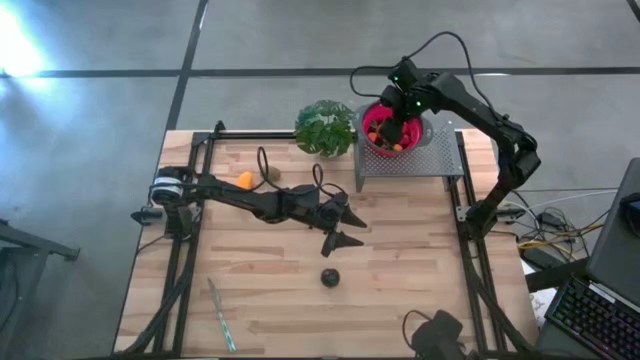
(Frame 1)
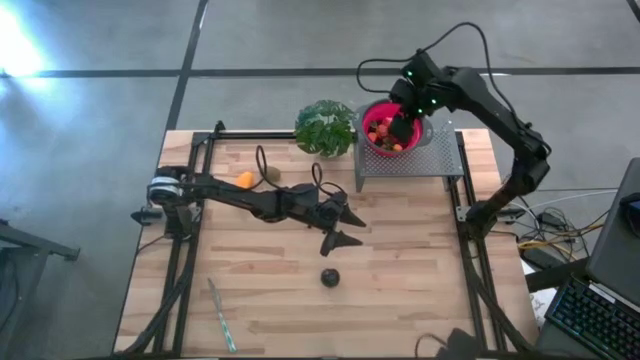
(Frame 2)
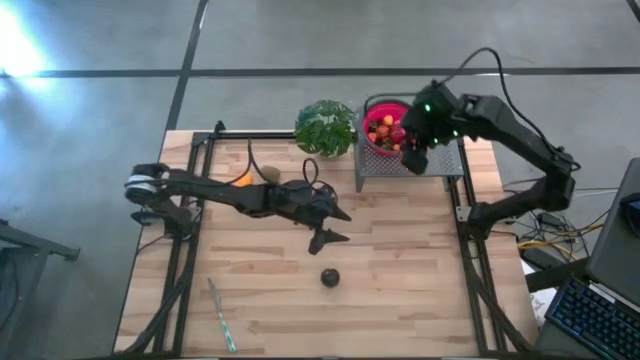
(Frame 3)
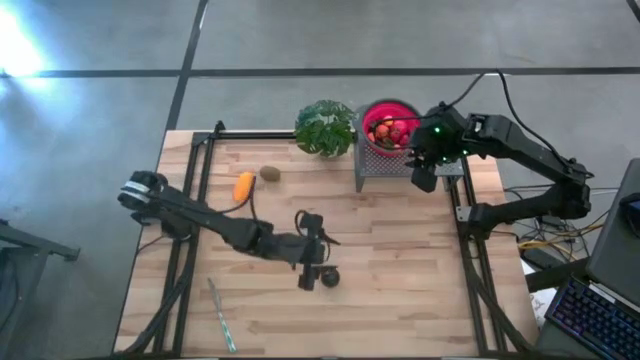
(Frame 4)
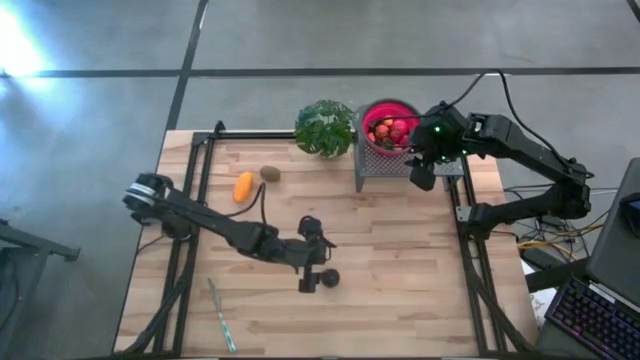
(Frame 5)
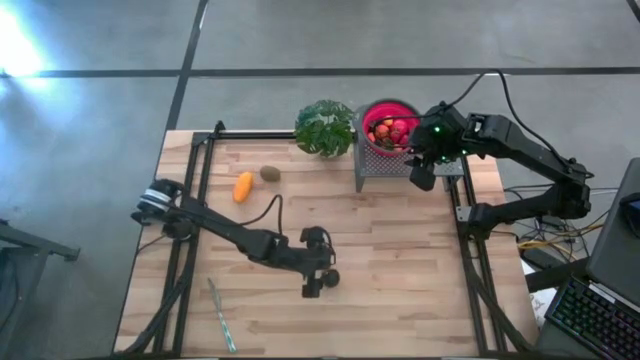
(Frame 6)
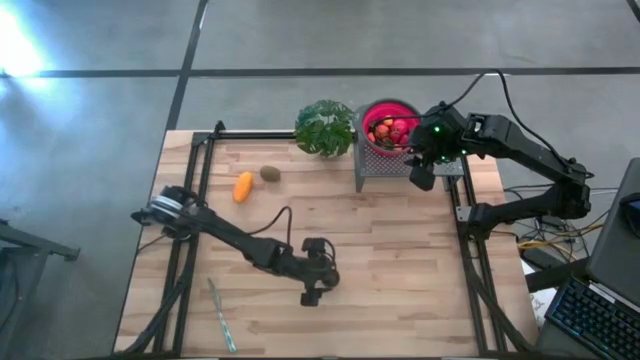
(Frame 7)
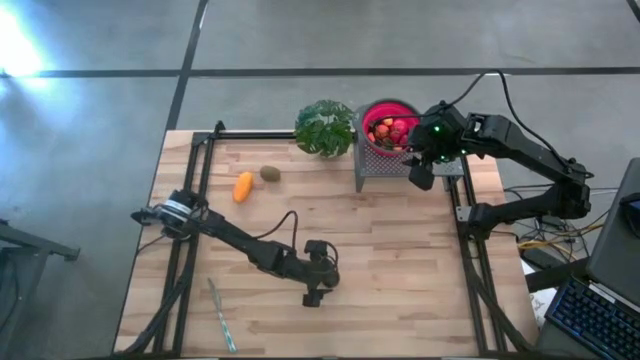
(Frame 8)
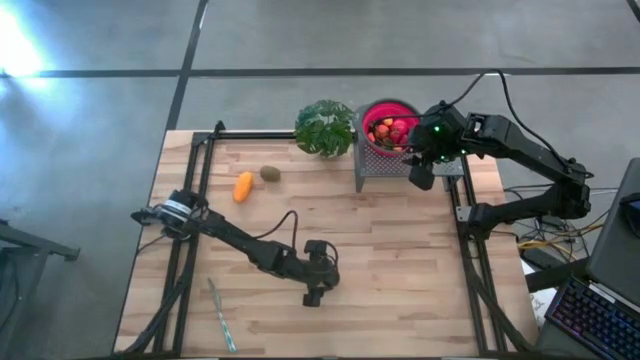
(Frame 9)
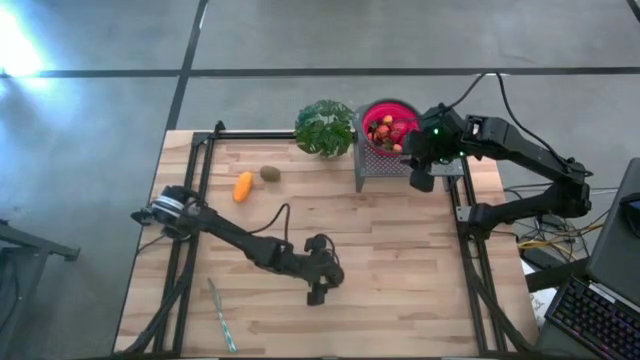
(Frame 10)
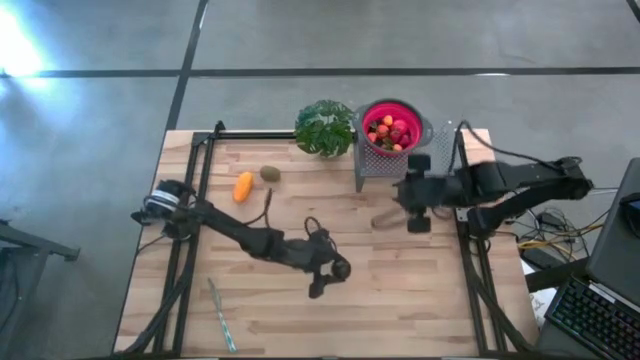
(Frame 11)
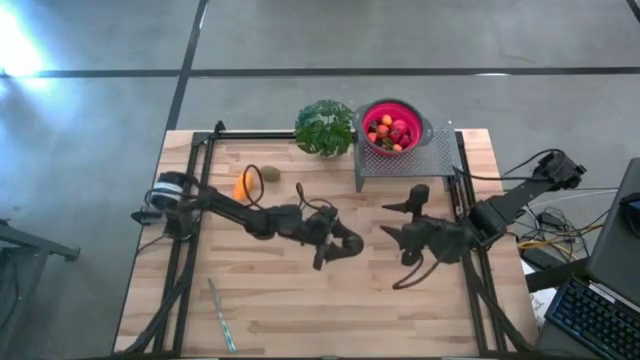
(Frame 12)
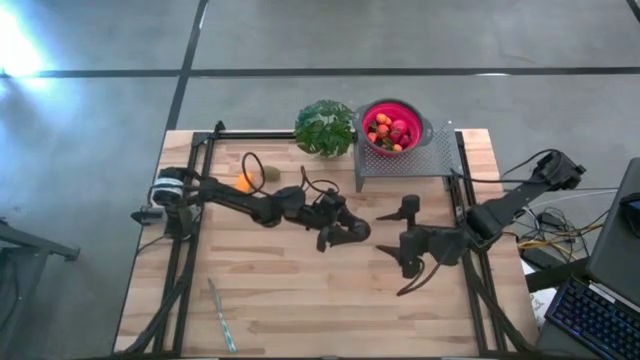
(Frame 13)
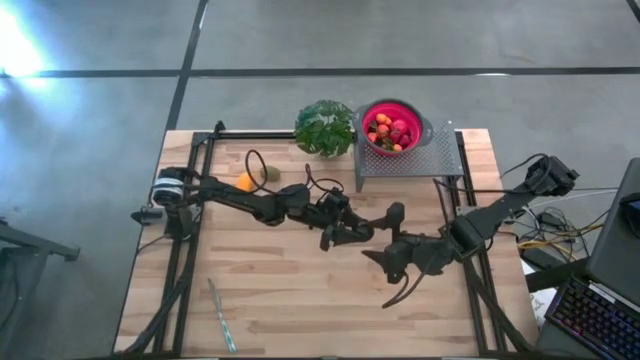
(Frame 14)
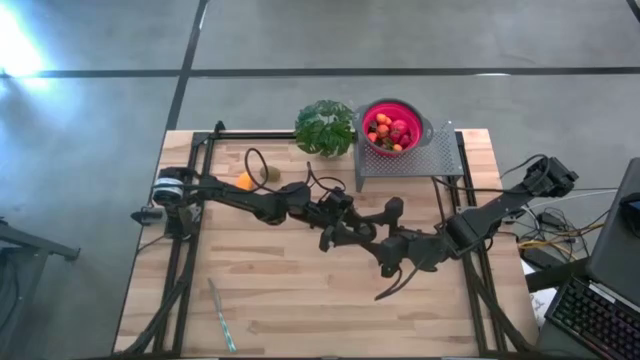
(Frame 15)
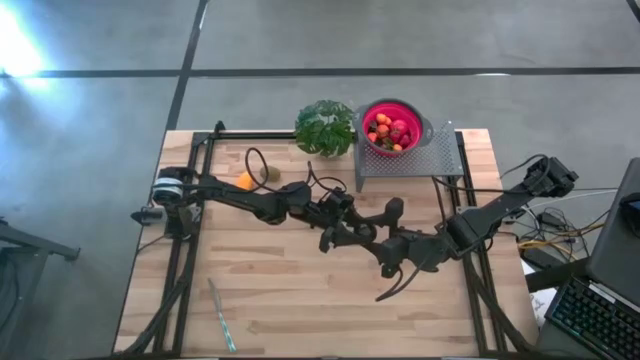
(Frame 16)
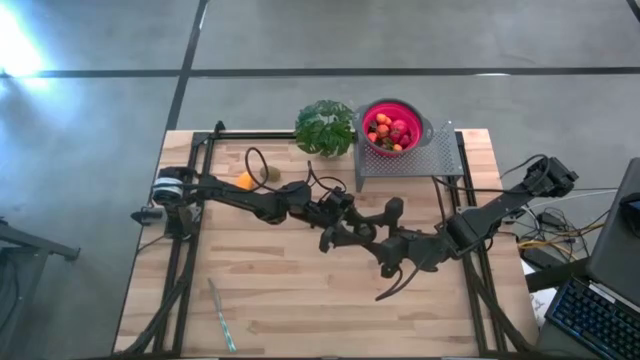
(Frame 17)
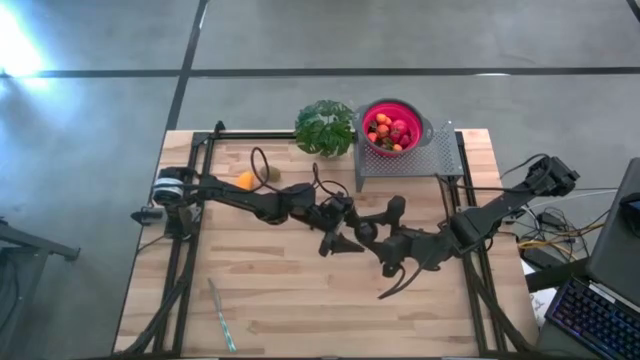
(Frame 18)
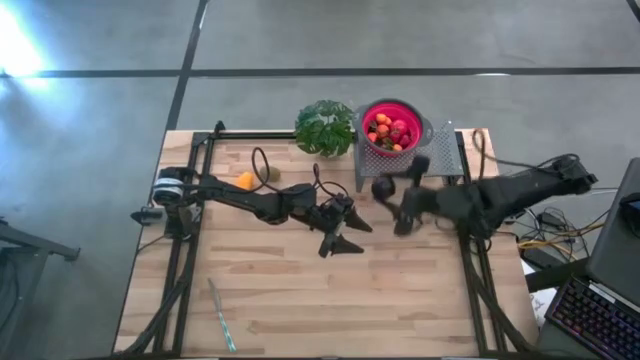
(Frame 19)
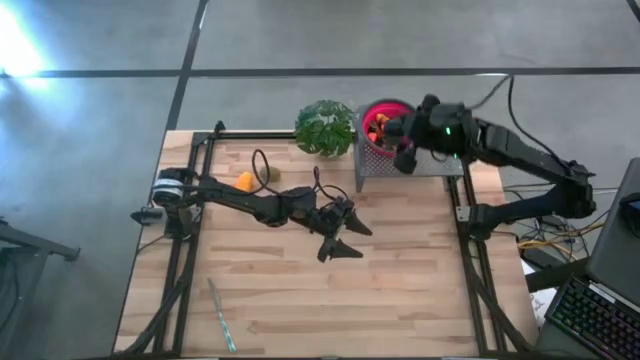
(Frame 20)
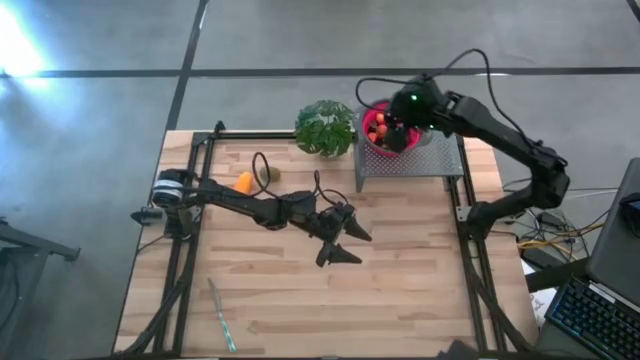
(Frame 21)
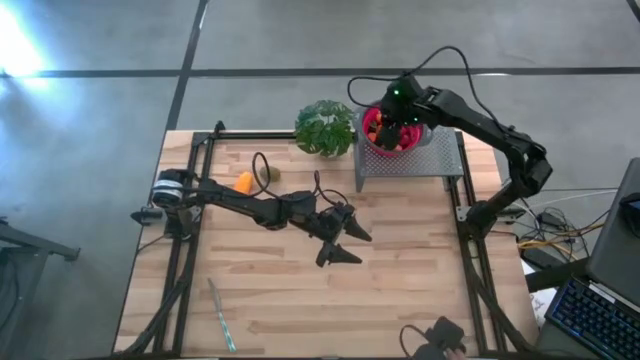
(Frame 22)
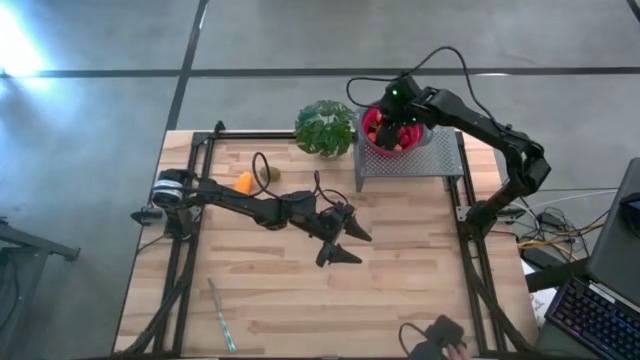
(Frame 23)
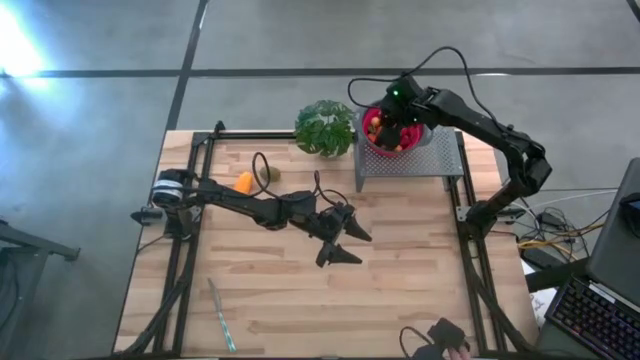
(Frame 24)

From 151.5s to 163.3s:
Task: Pick & Place Fruit
Put the plum into the red strainer bowl on the shelf

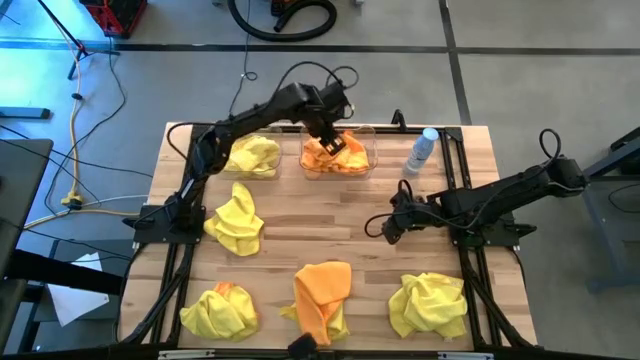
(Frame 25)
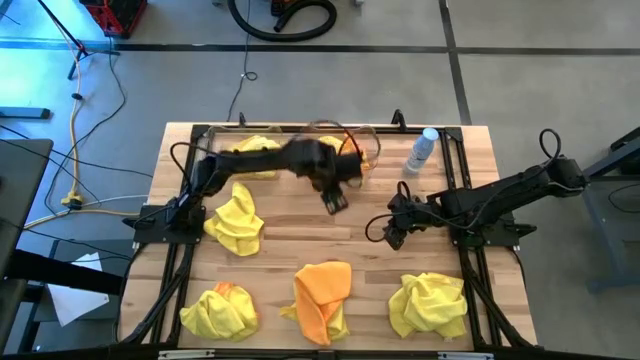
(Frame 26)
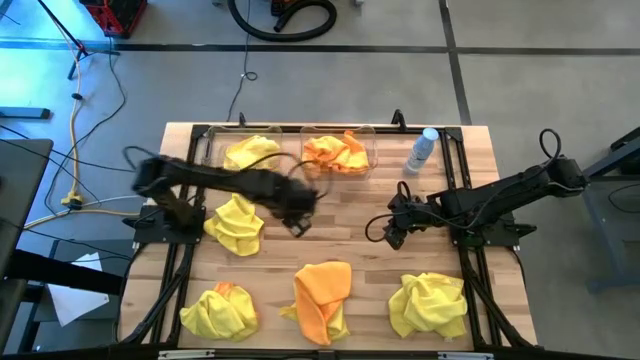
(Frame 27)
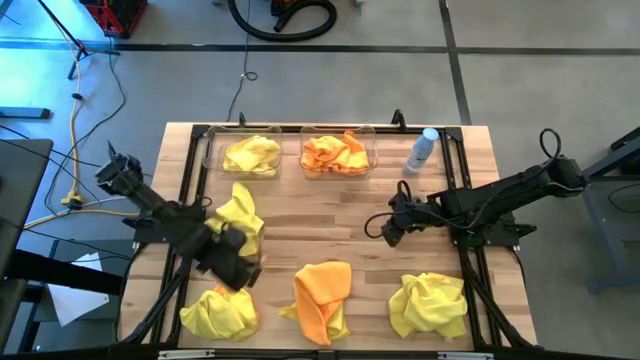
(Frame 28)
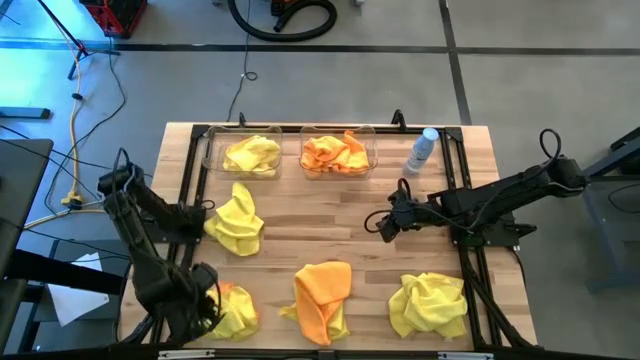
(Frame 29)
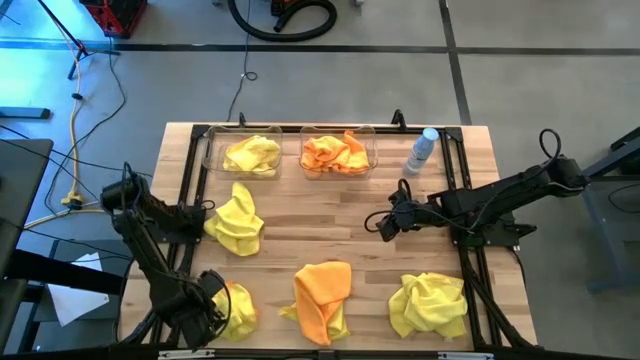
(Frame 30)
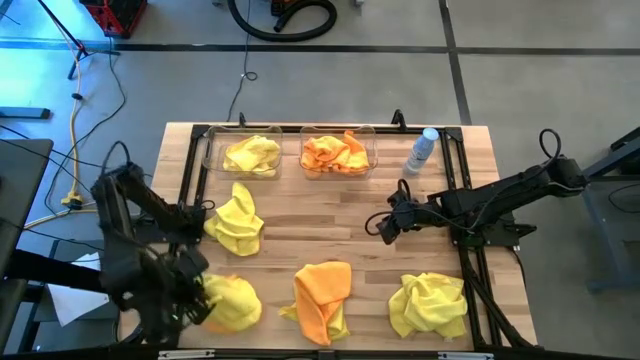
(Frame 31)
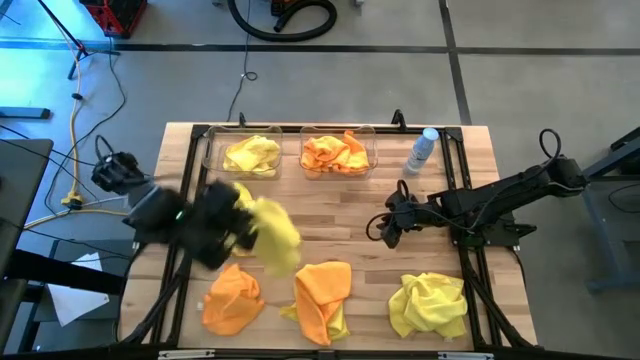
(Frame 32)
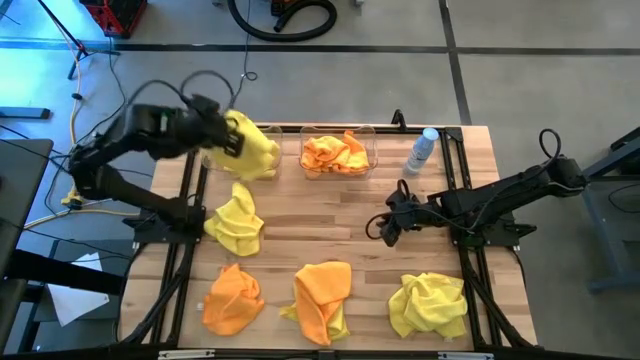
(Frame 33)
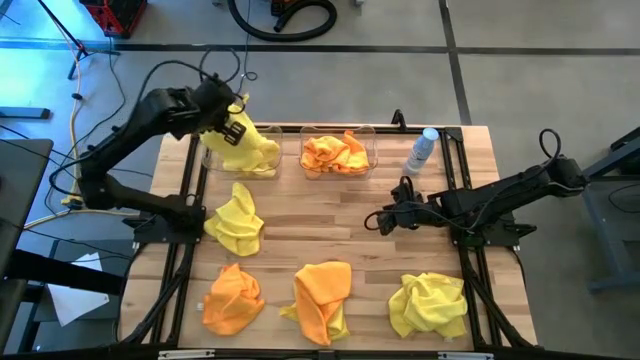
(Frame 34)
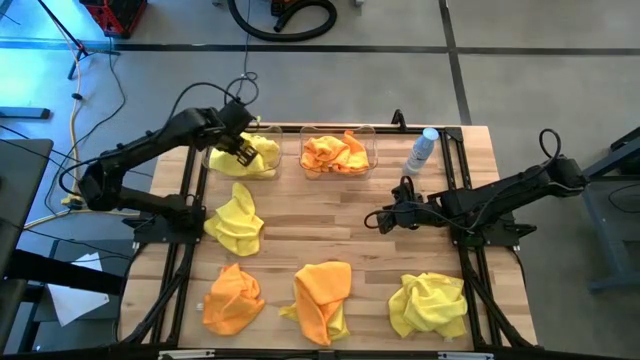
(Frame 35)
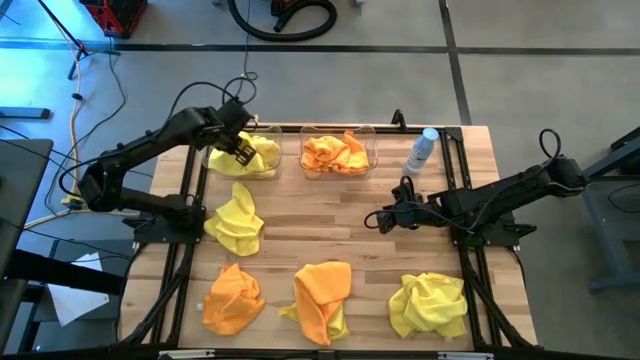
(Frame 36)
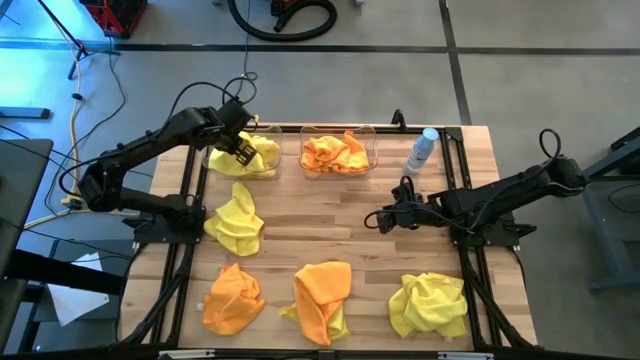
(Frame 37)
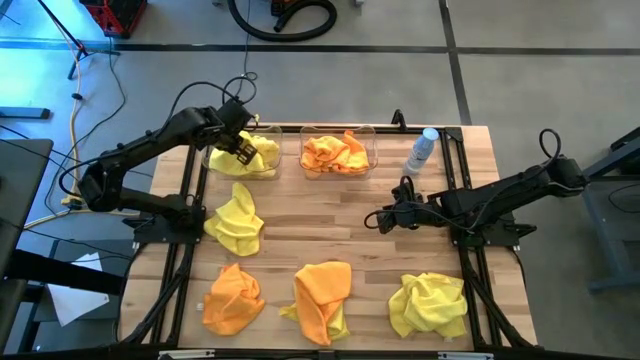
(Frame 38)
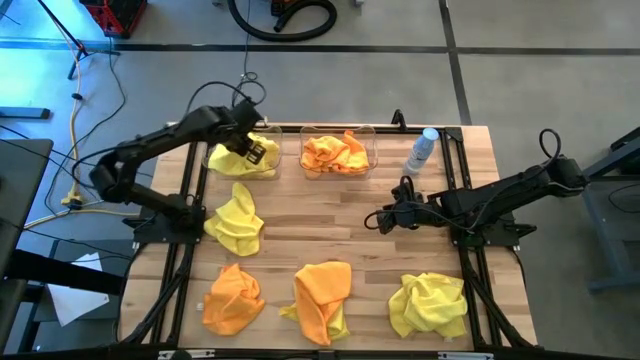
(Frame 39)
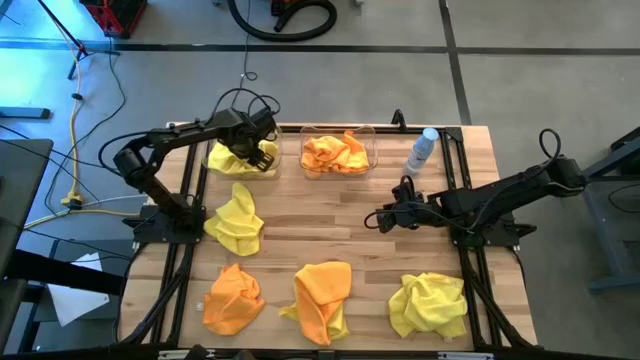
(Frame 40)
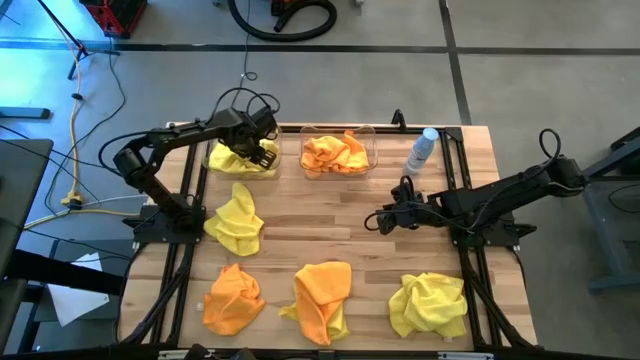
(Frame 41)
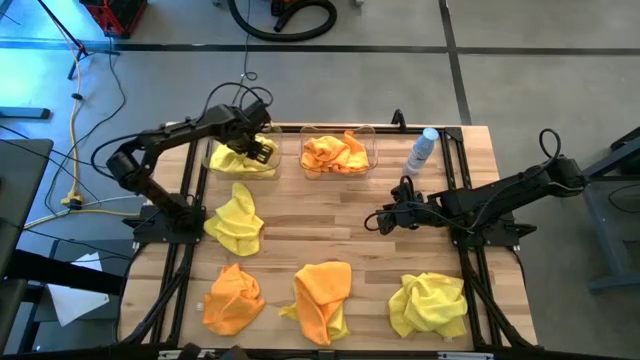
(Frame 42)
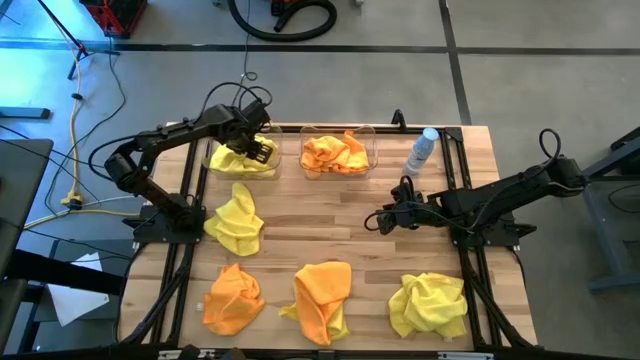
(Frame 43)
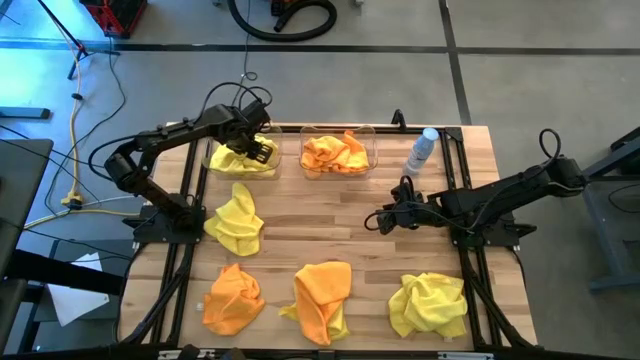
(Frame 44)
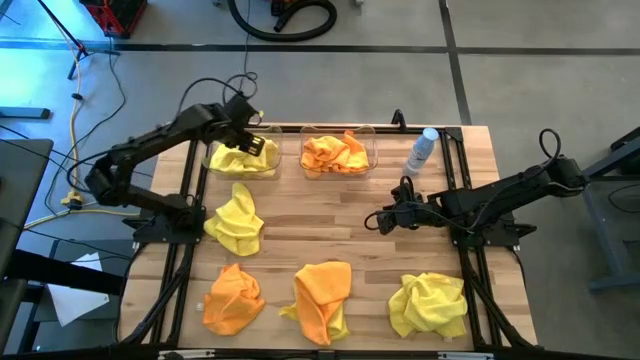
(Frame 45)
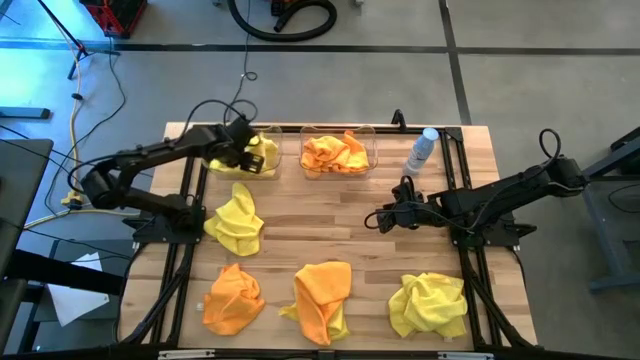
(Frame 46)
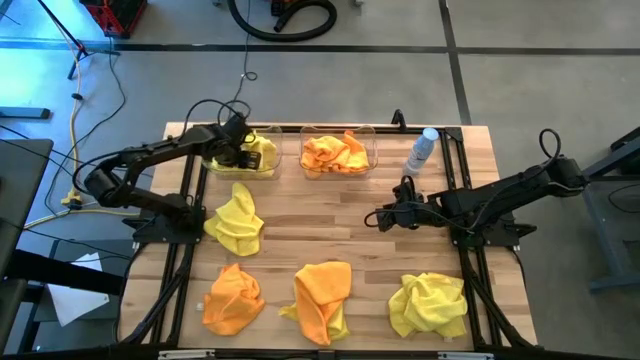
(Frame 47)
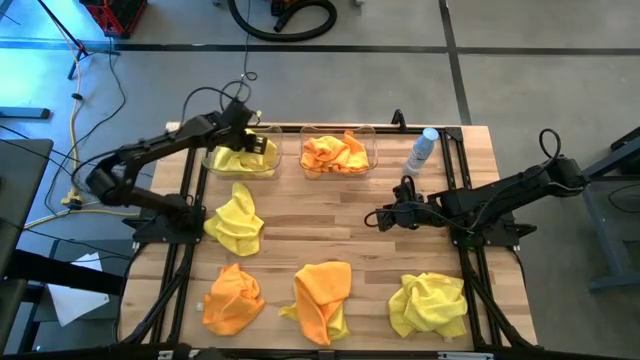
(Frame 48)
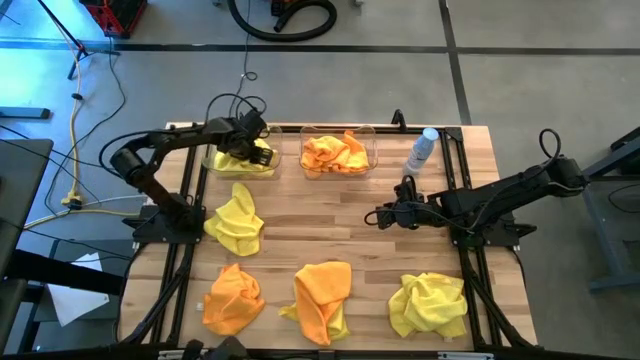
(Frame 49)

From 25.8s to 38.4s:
Task: Sort microfiber towel by color & place in baskets
Put the yellow microfiber towel into the left transparent bin
